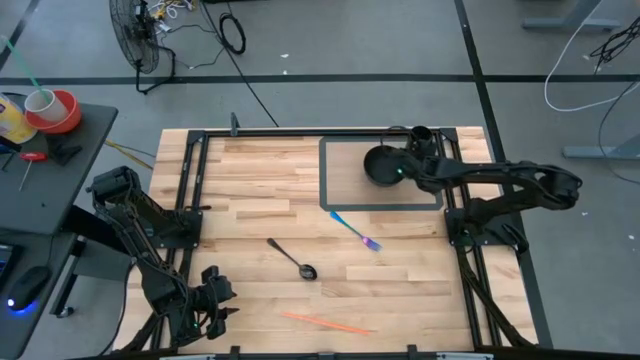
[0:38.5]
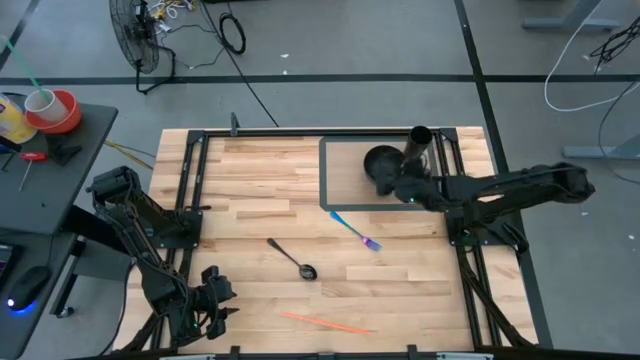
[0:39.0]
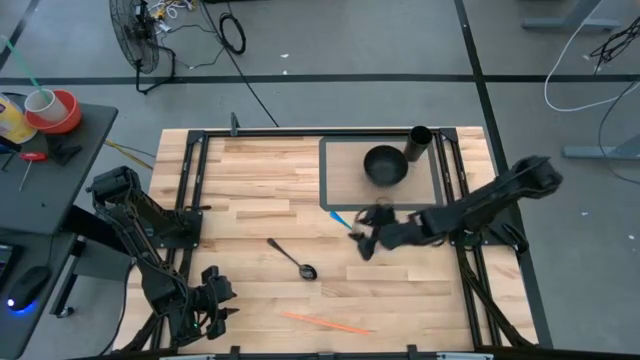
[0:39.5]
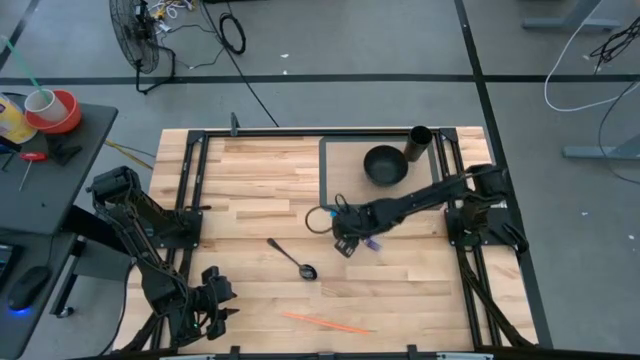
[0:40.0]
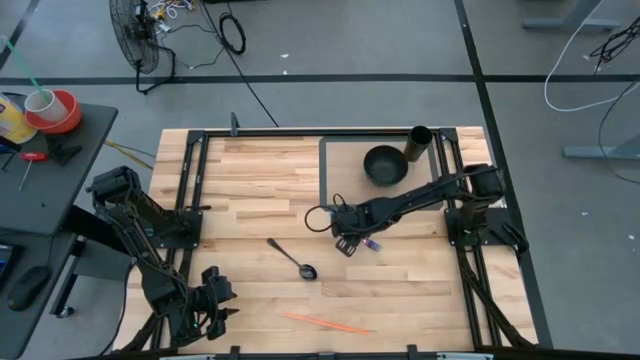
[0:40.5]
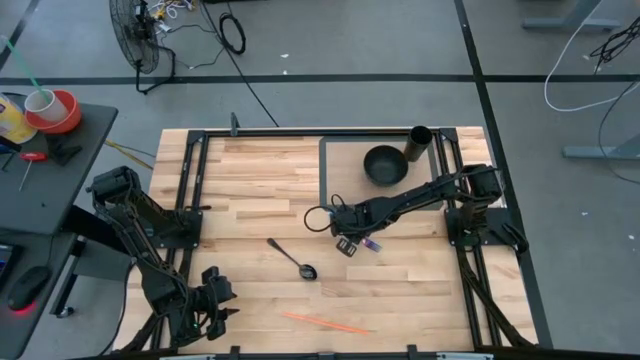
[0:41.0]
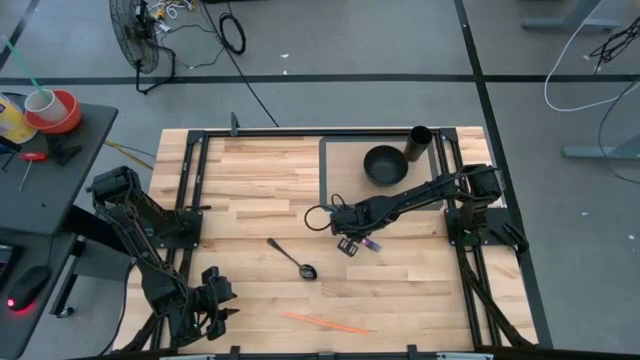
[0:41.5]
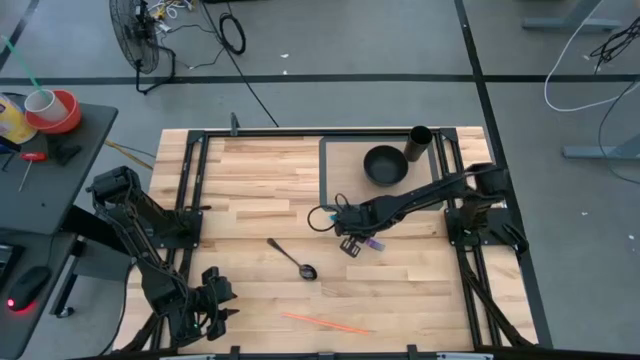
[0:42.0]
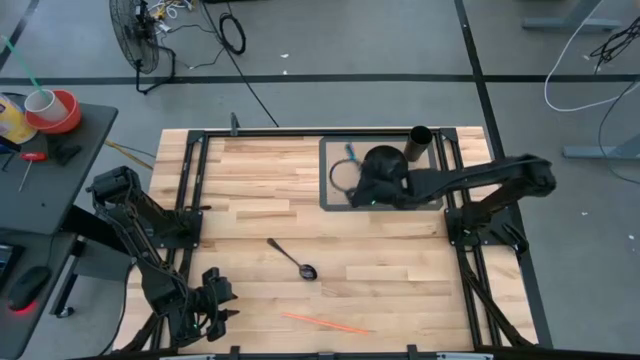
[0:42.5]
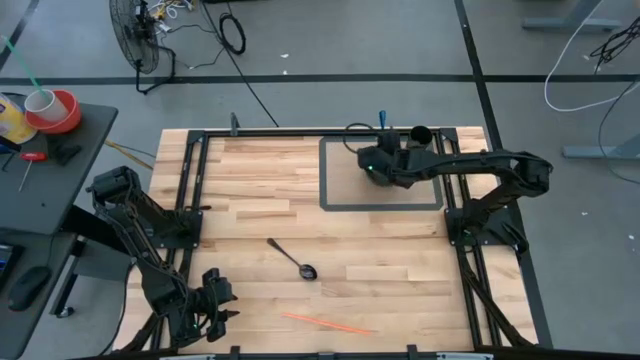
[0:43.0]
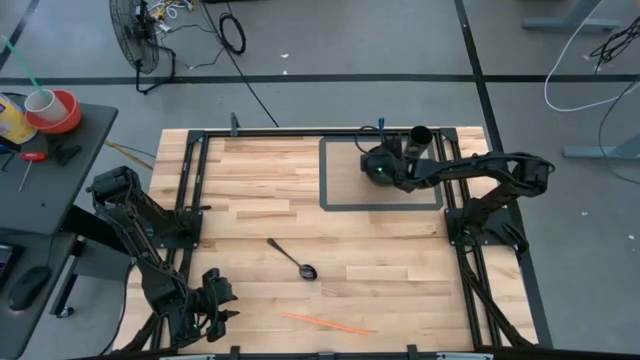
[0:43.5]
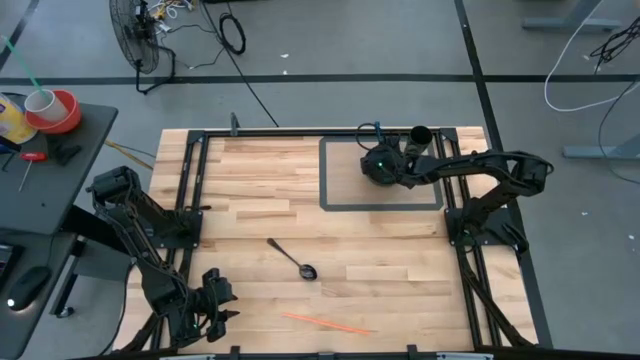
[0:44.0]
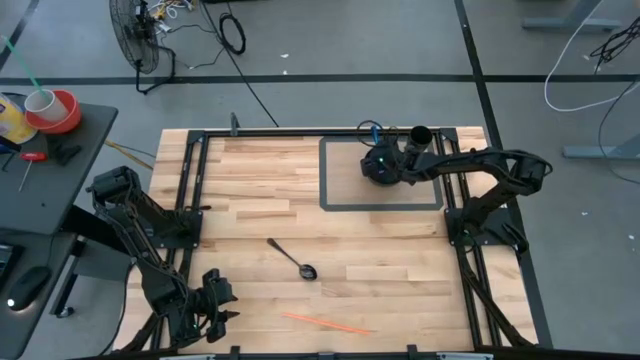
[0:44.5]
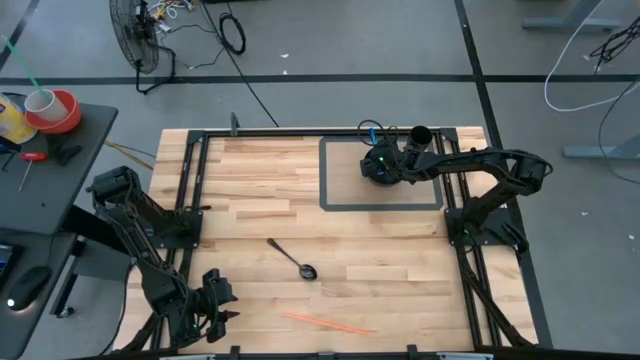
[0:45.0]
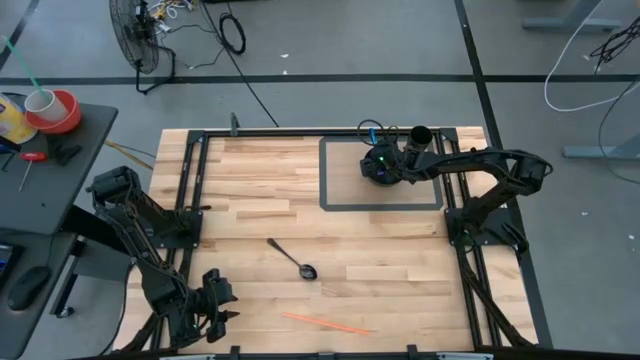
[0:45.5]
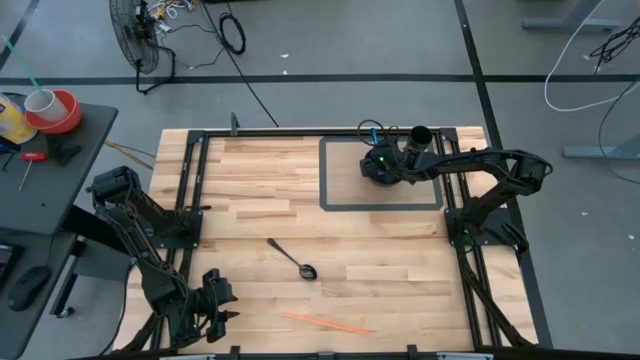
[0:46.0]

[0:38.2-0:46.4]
Task: Pick & Place Utensil
Put the blue fork into the black bowl

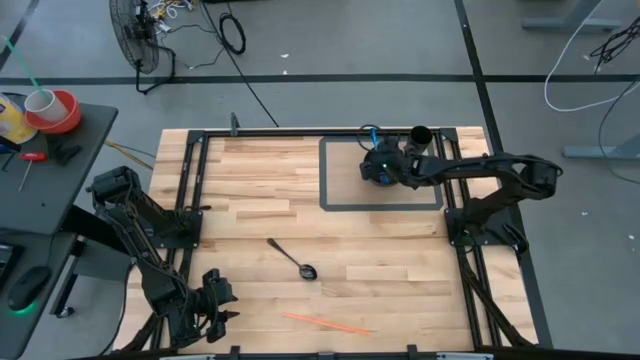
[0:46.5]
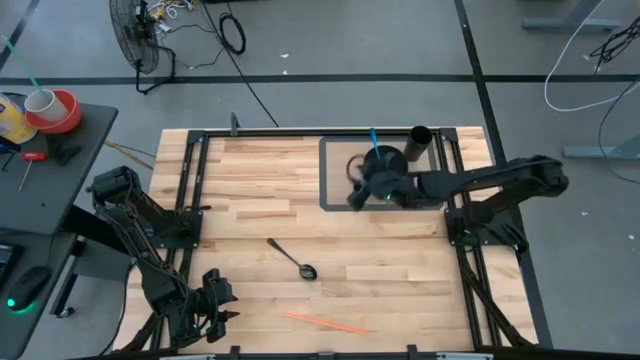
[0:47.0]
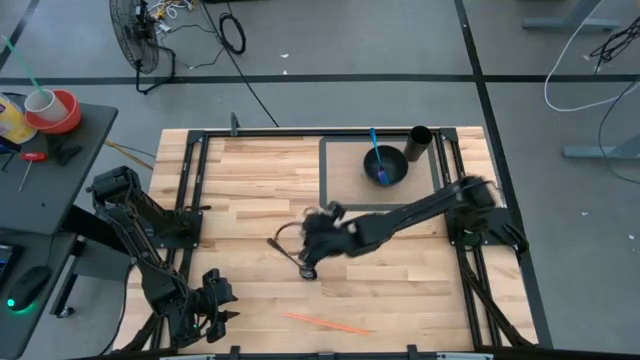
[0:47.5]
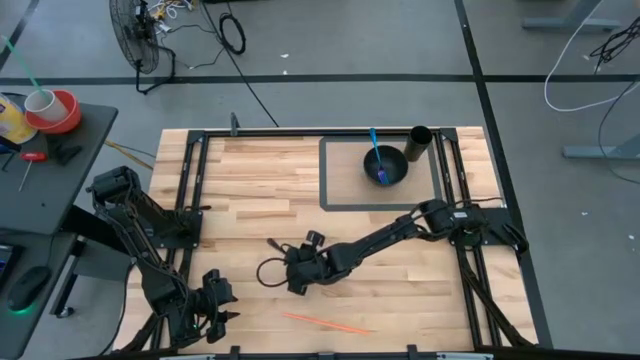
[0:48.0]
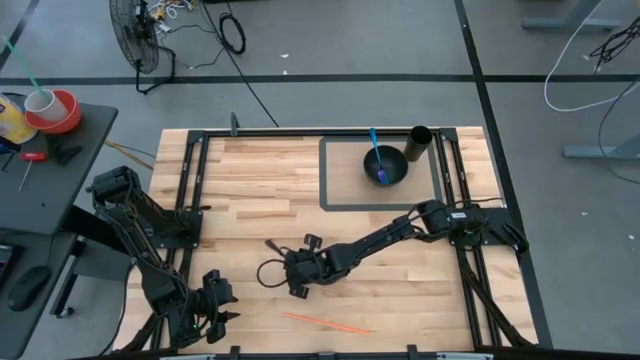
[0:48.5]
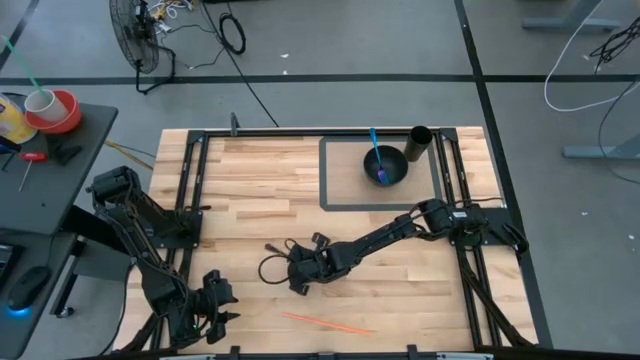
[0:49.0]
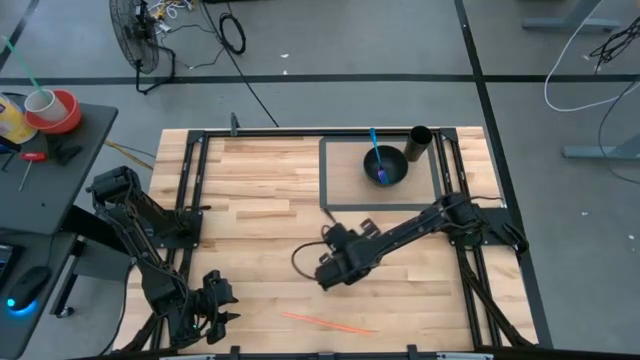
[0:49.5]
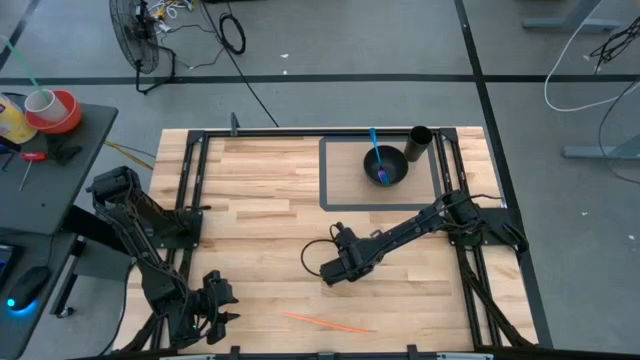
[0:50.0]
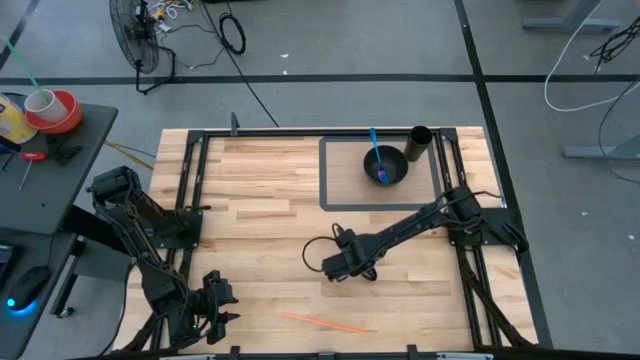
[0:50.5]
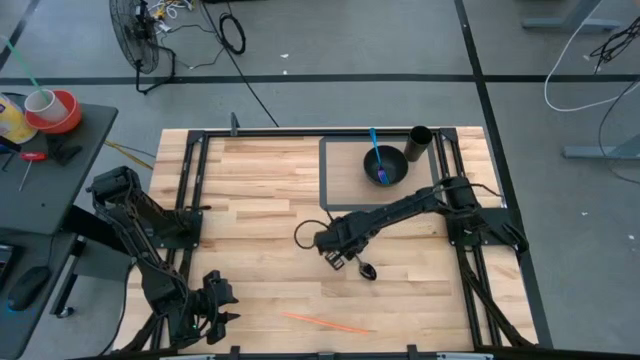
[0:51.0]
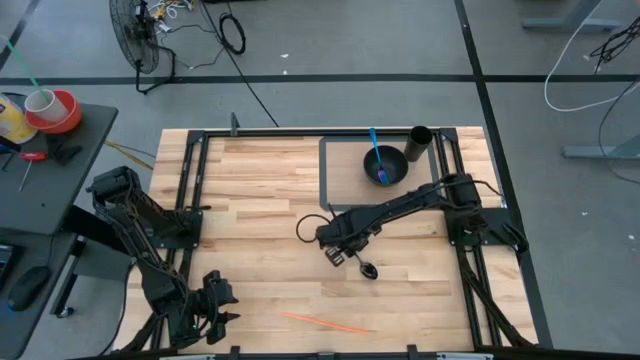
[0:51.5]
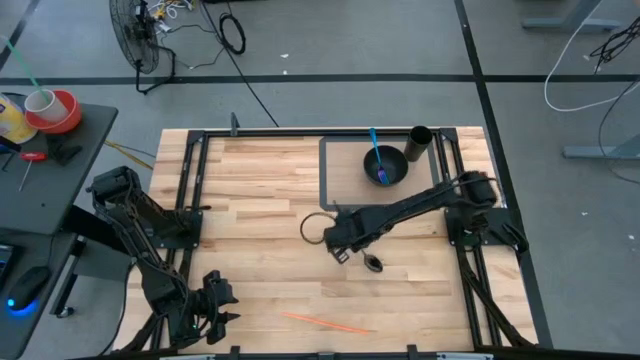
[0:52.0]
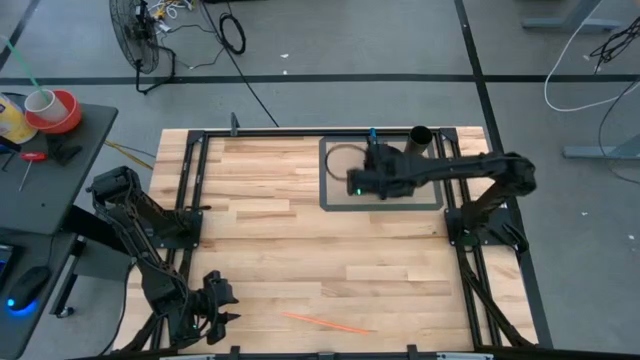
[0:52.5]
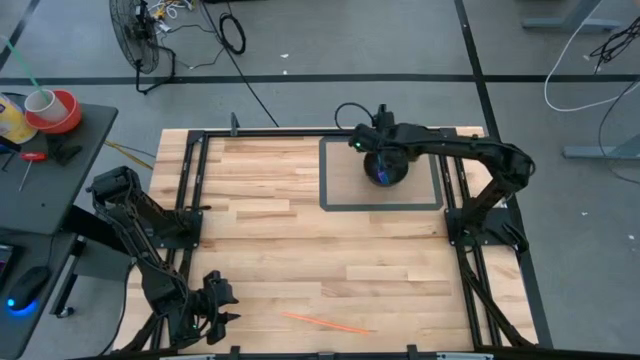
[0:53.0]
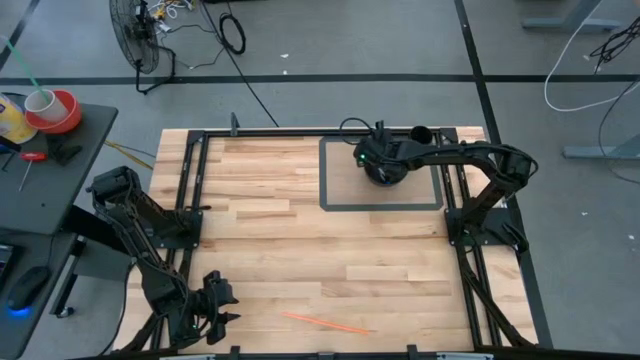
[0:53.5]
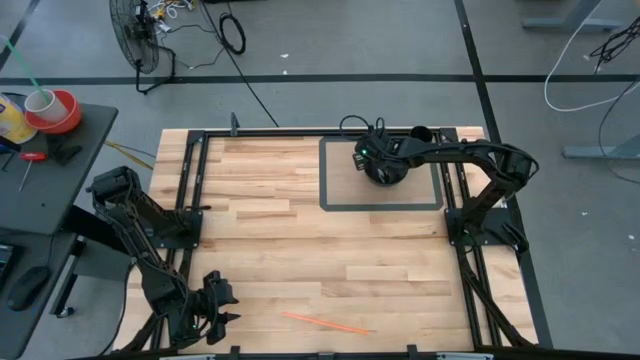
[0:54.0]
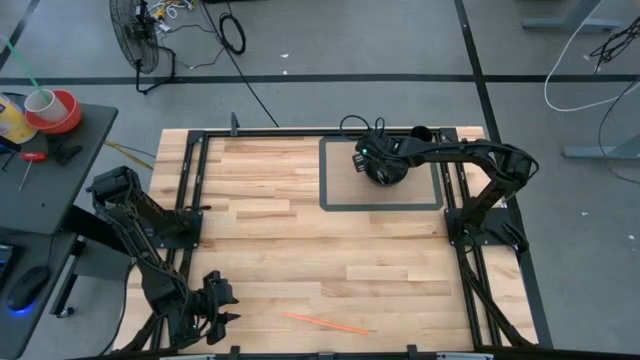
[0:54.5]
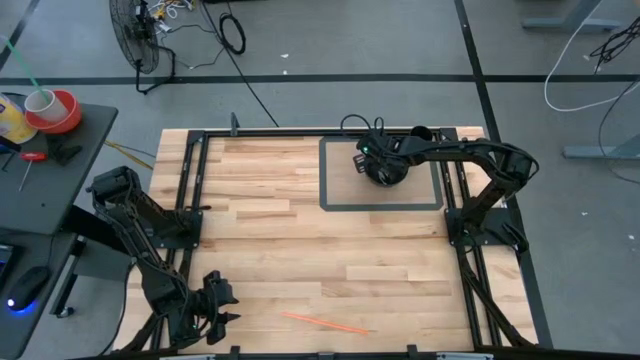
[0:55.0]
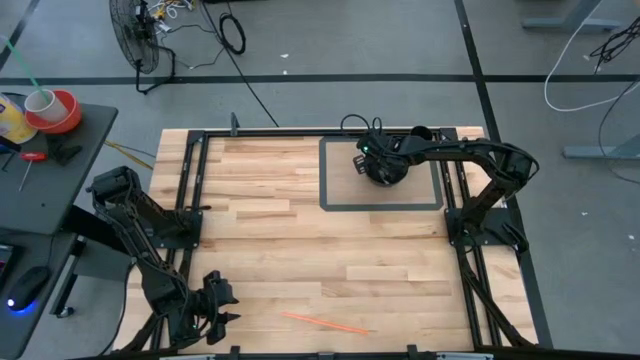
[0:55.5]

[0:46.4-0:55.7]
Put the black spoon into the black bowl

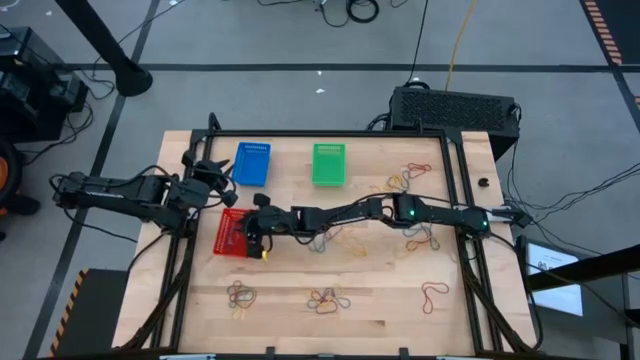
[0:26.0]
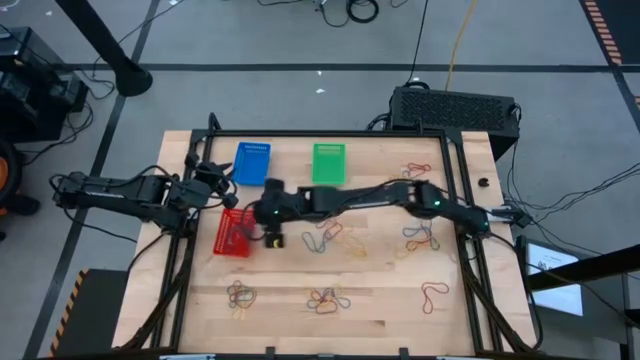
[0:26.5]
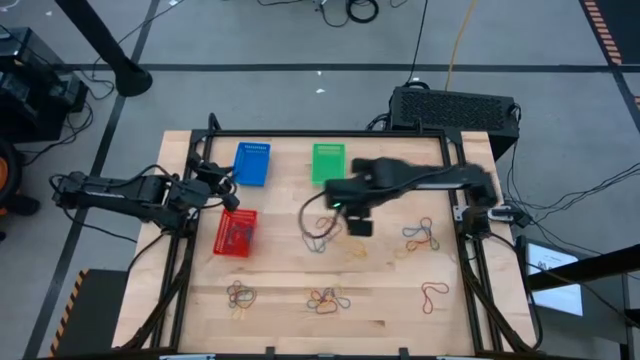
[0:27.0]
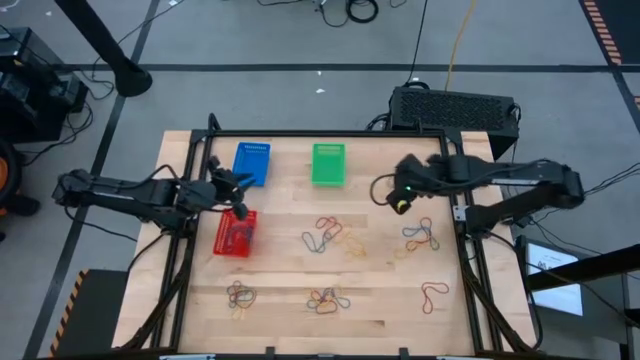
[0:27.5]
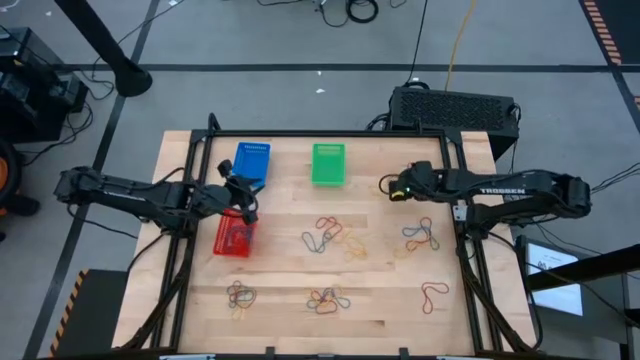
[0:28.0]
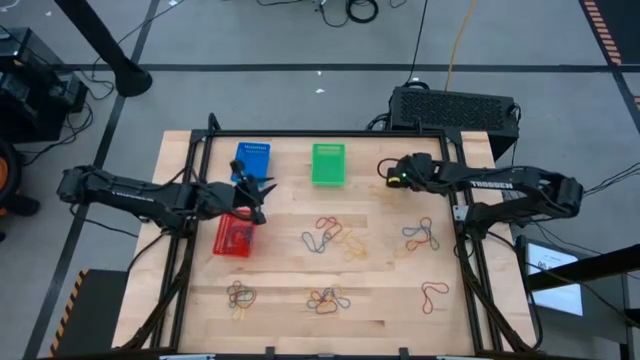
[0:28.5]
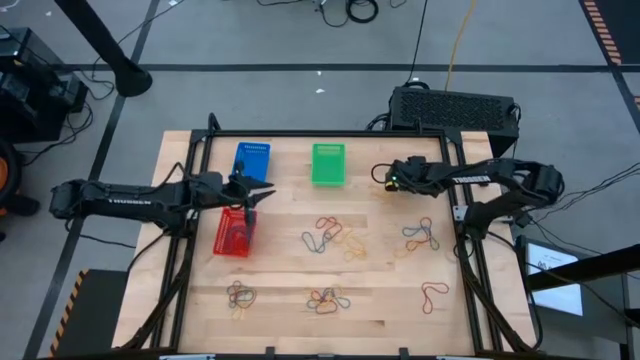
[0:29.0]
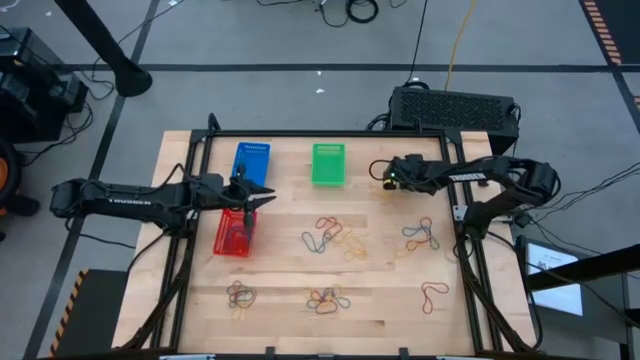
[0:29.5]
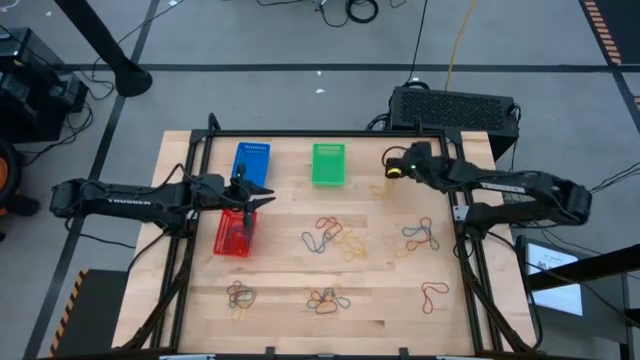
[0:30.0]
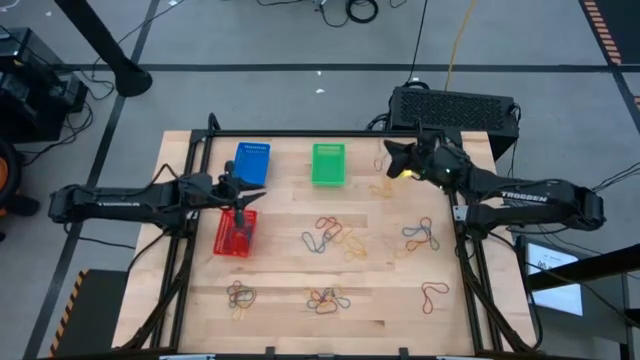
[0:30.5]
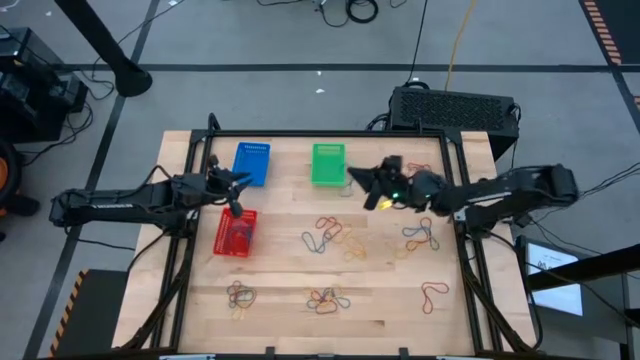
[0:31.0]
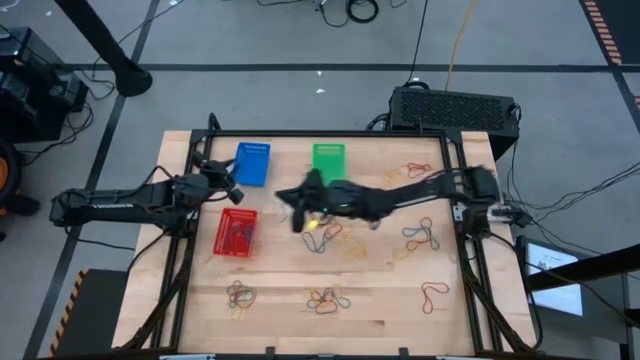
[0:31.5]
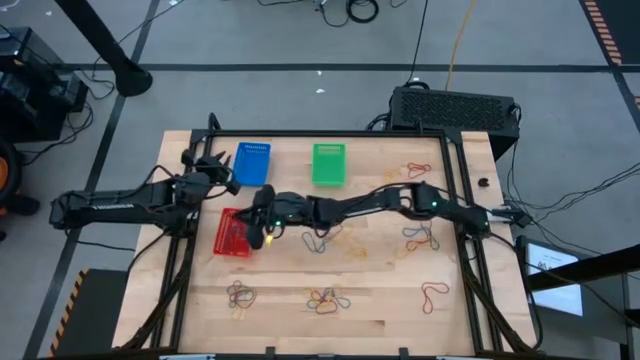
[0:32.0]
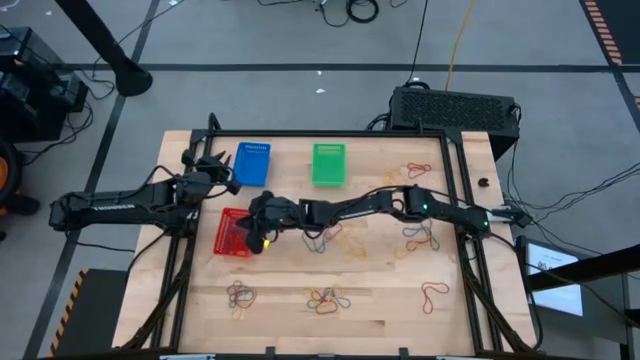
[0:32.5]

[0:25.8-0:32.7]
Task: Sort rubber bands into baskets
Put the blue rubber band into the red basket
